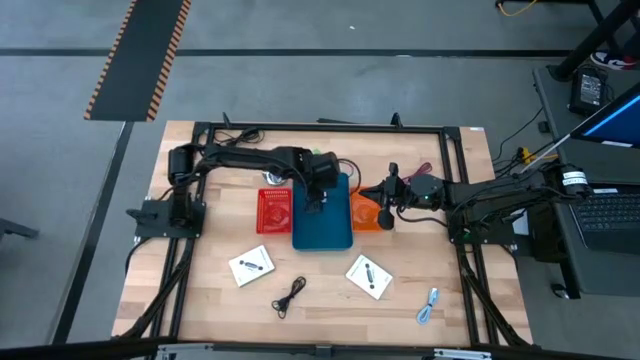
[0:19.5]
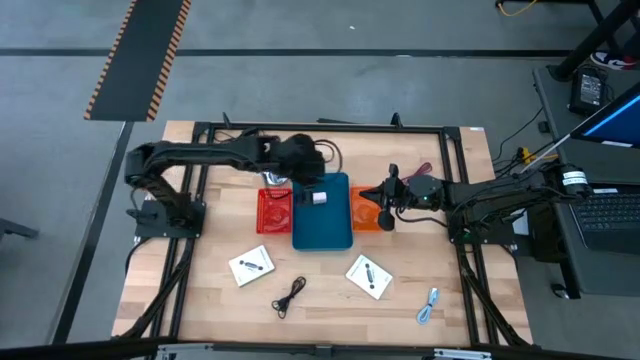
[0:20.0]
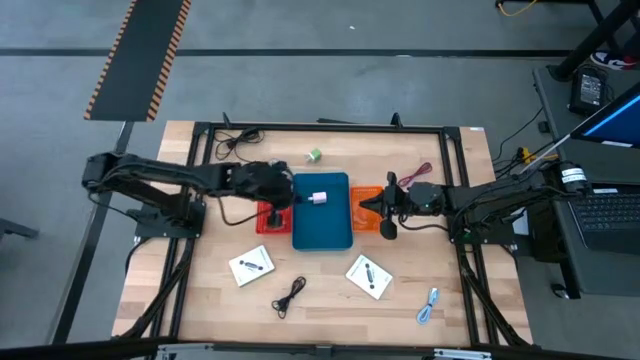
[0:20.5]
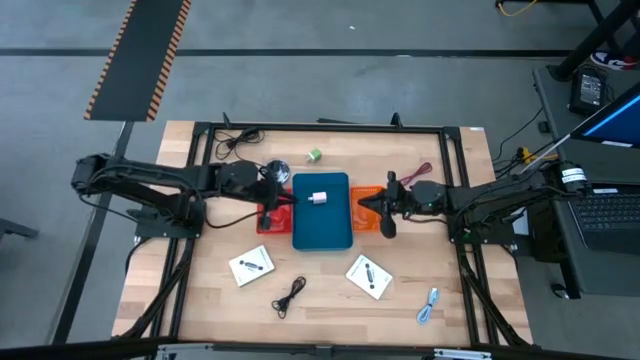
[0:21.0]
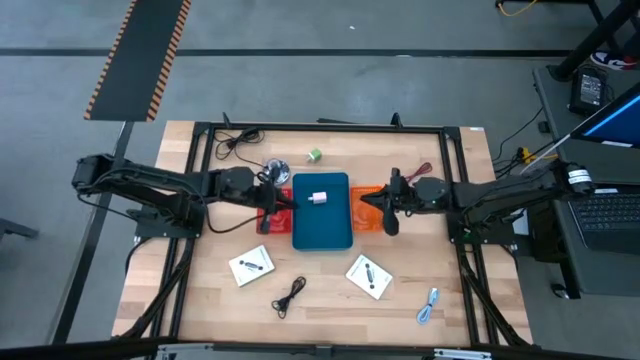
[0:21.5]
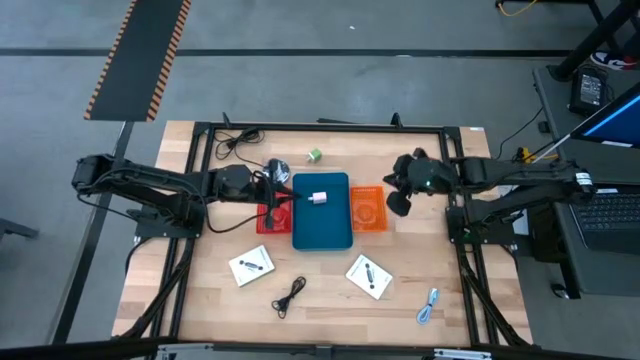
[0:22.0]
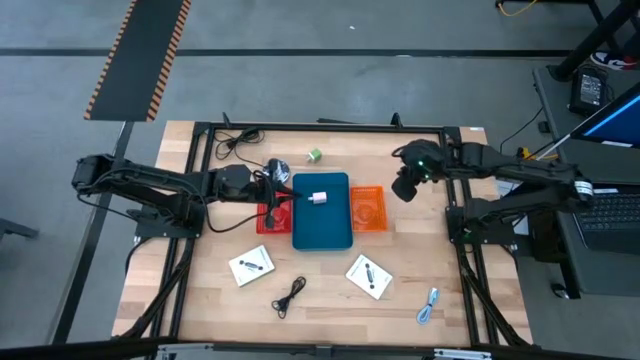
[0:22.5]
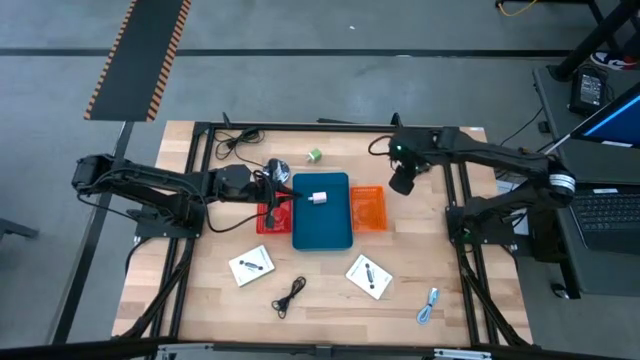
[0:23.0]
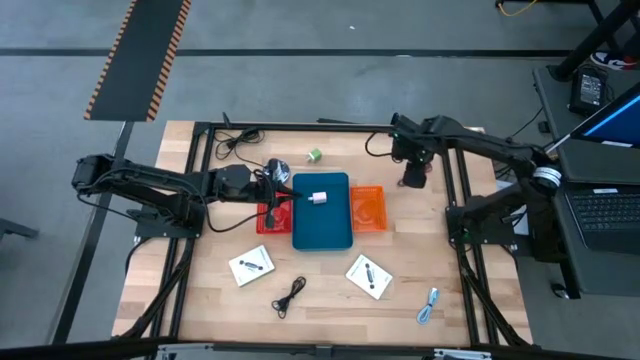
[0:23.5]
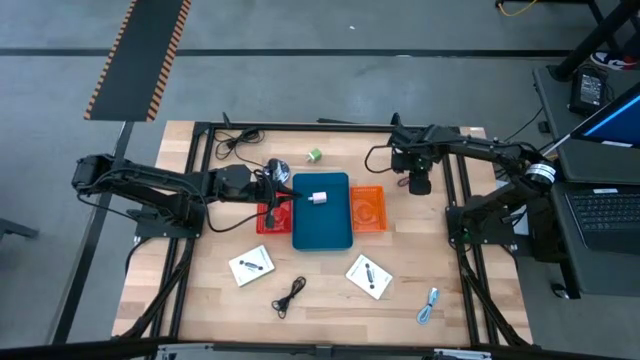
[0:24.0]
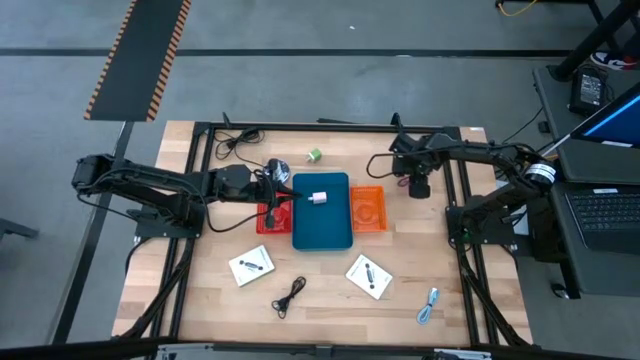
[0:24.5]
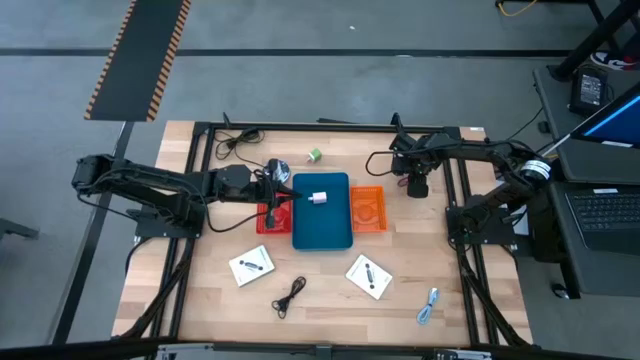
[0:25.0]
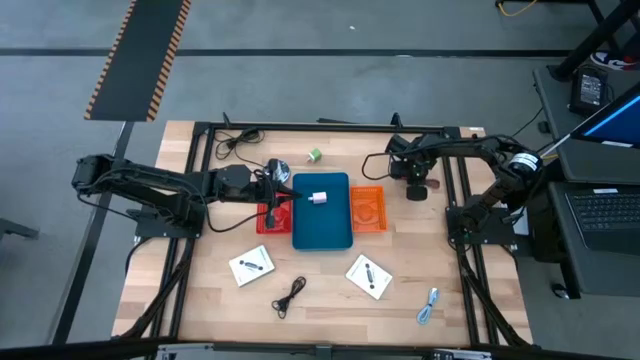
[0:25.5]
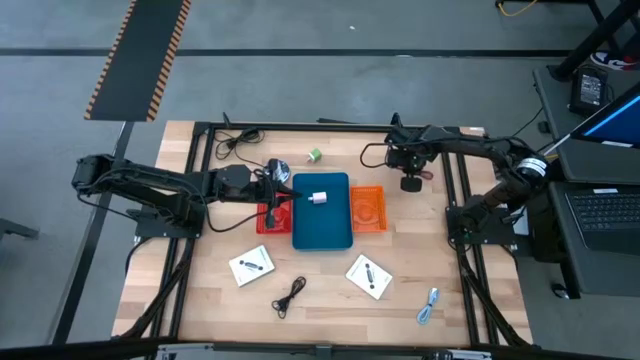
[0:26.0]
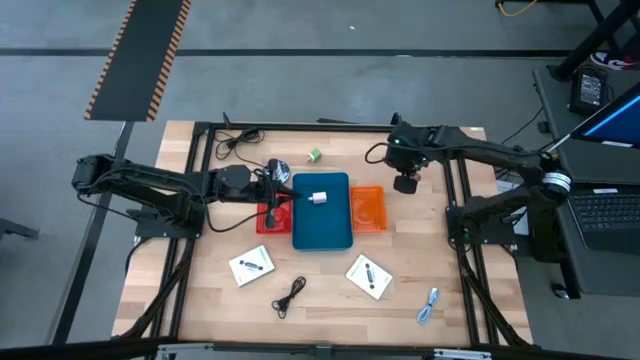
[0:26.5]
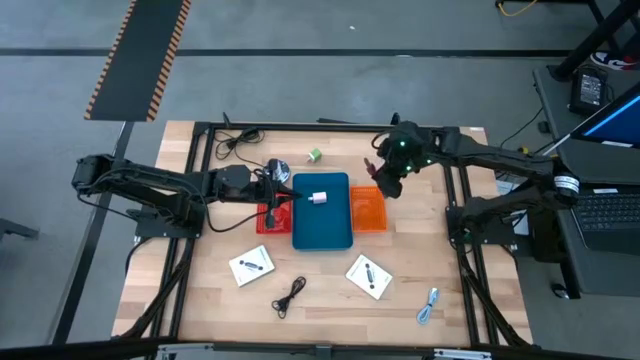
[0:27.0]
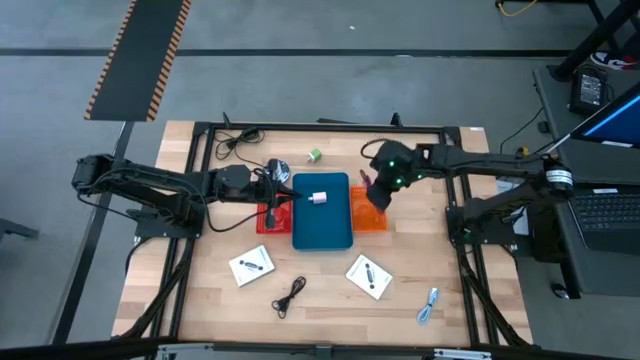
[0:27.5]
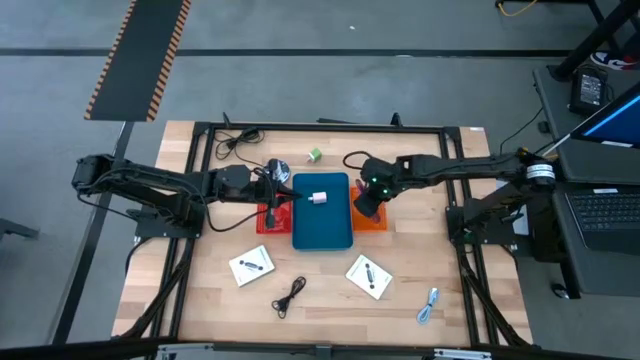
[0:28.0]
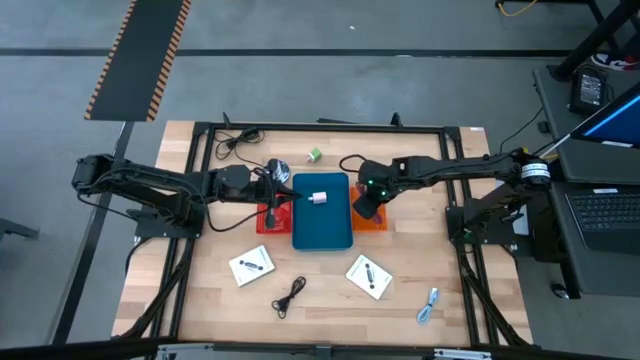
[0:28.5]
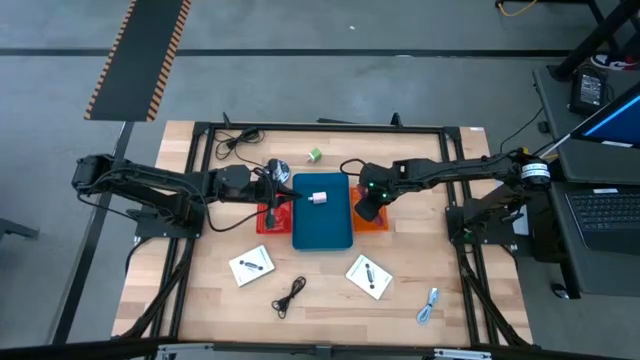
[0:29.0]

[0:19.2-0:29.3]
Task: Pick and place items into bin
Put the pink USB cable into the orange bin

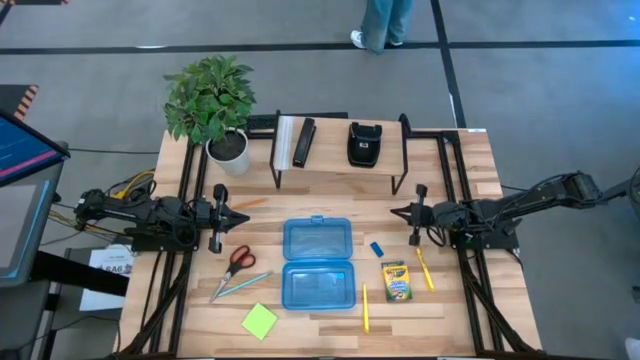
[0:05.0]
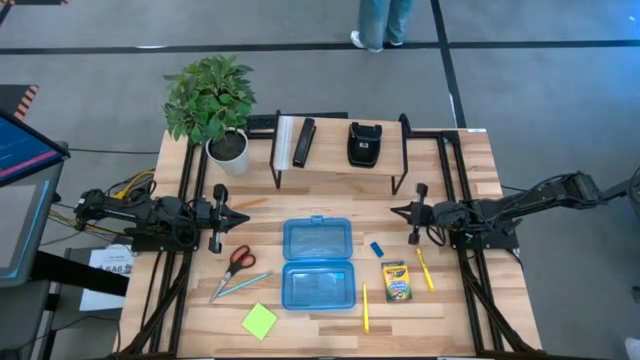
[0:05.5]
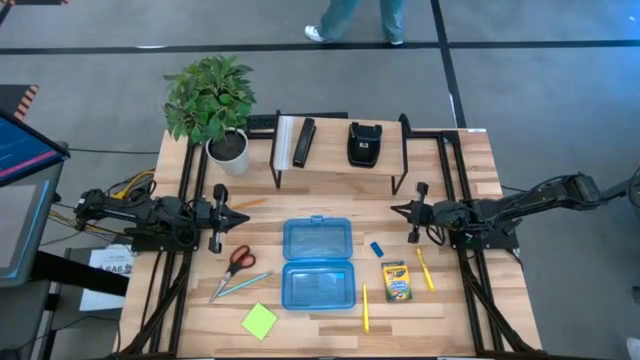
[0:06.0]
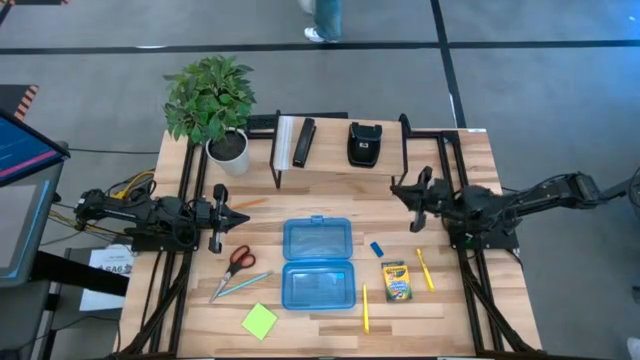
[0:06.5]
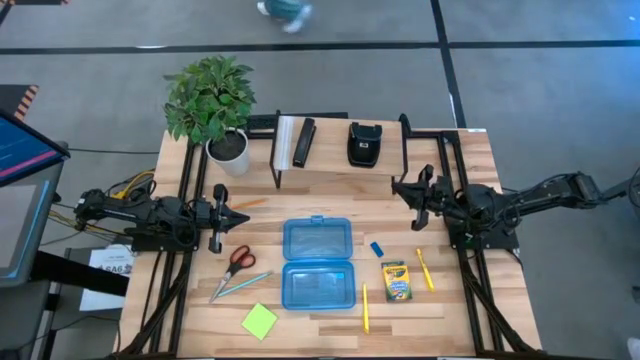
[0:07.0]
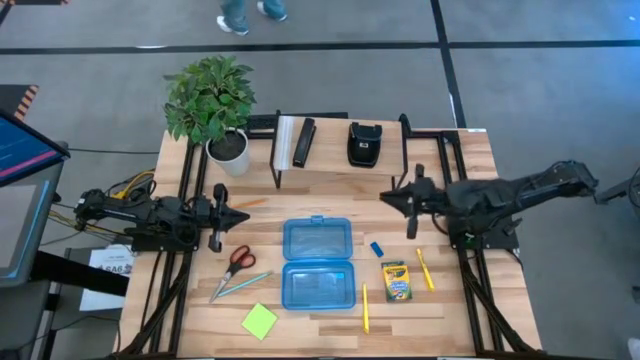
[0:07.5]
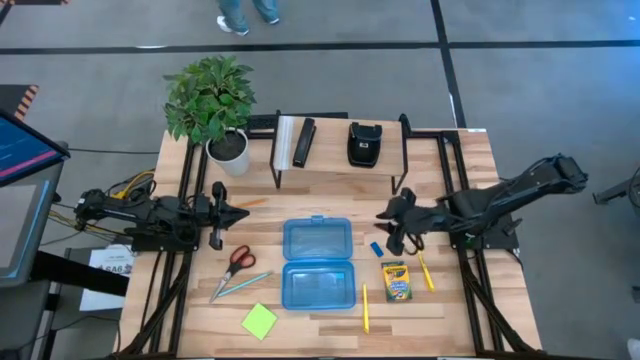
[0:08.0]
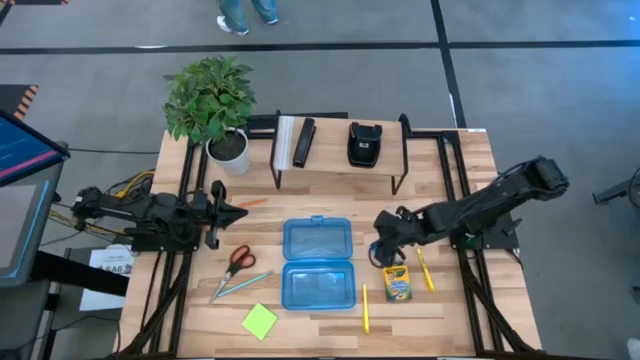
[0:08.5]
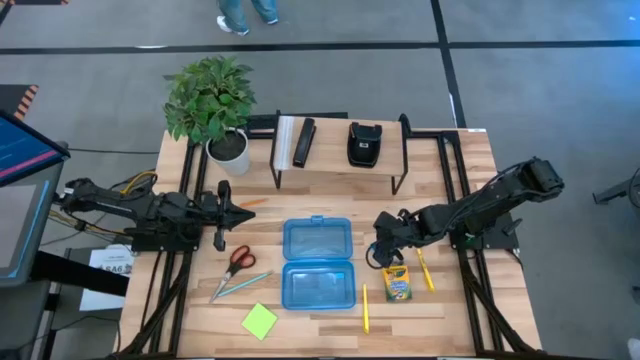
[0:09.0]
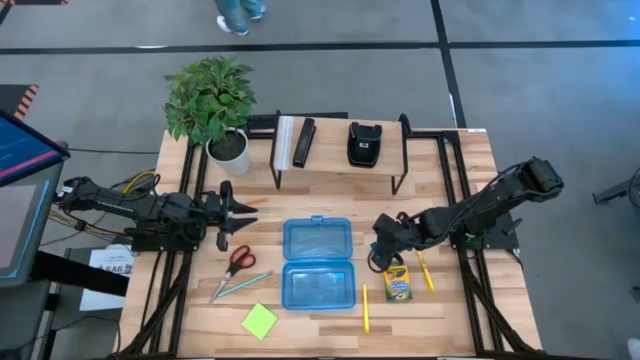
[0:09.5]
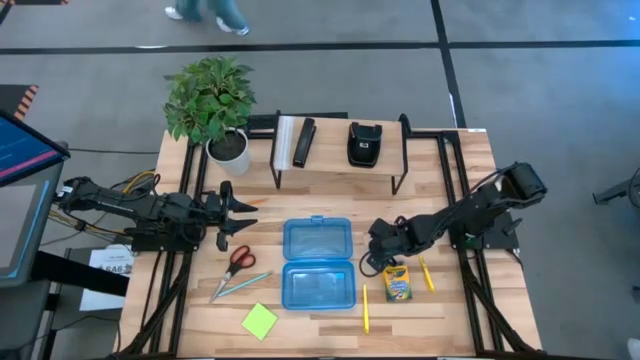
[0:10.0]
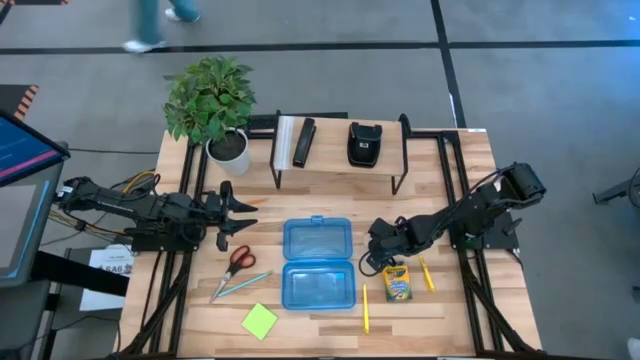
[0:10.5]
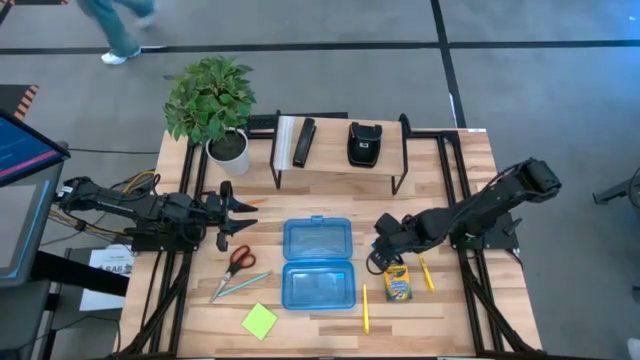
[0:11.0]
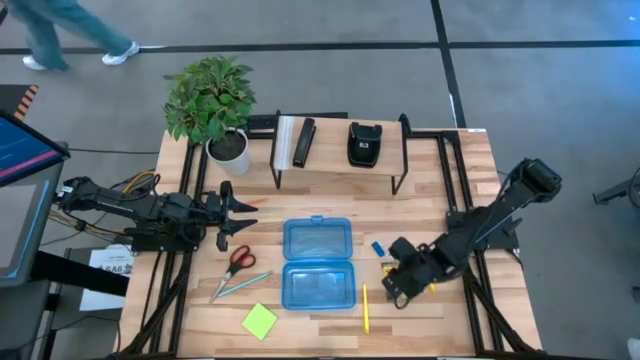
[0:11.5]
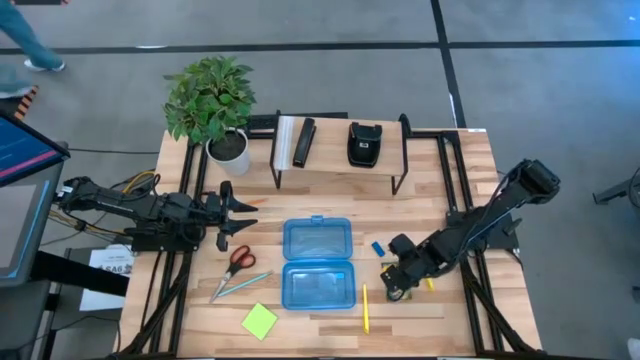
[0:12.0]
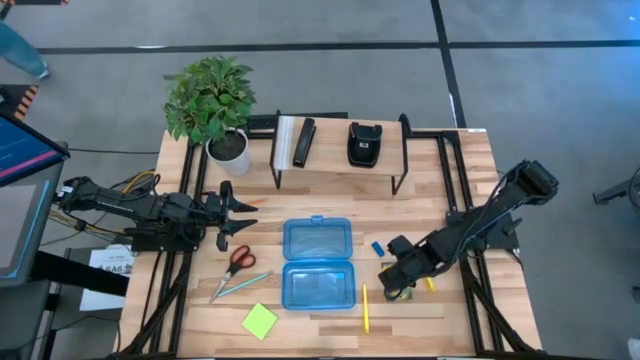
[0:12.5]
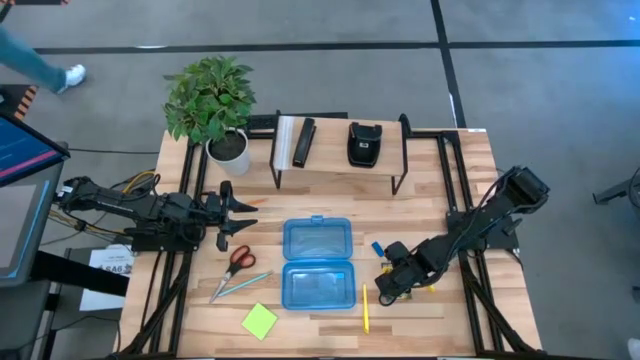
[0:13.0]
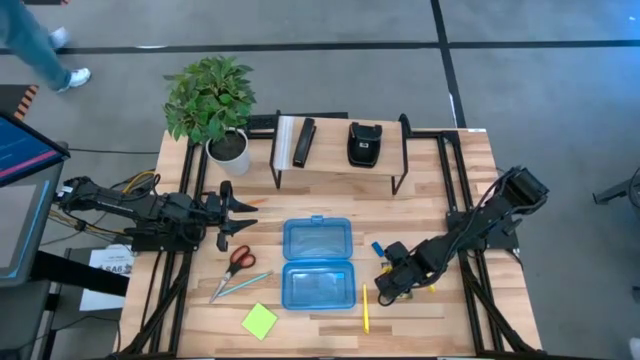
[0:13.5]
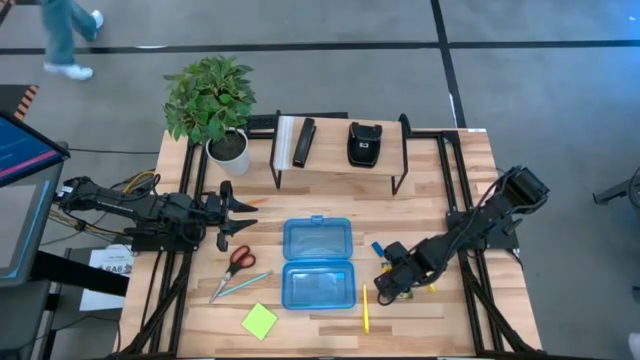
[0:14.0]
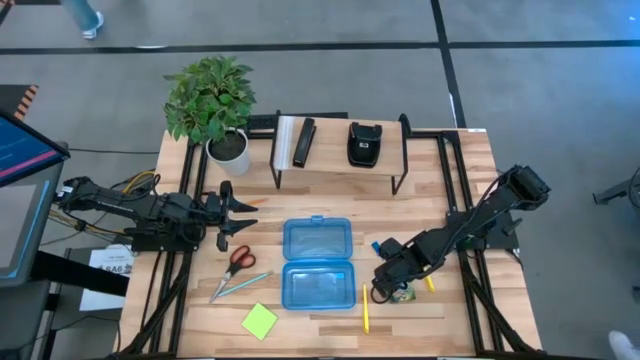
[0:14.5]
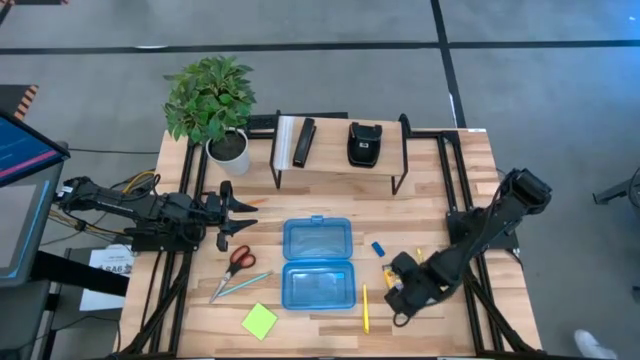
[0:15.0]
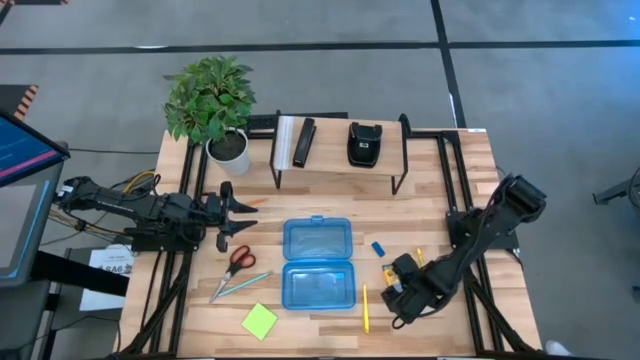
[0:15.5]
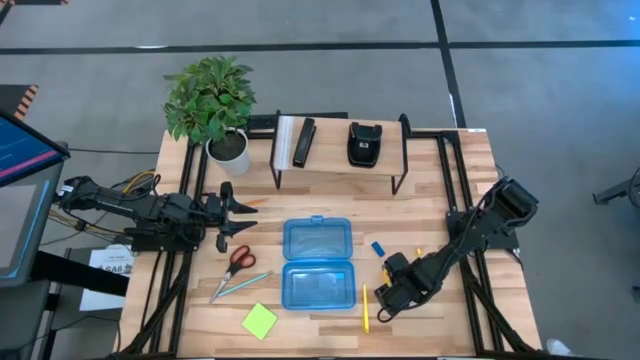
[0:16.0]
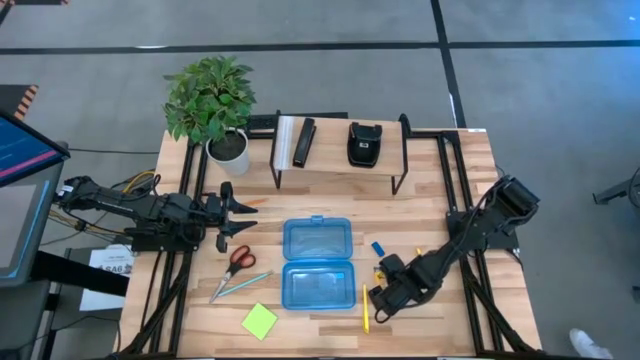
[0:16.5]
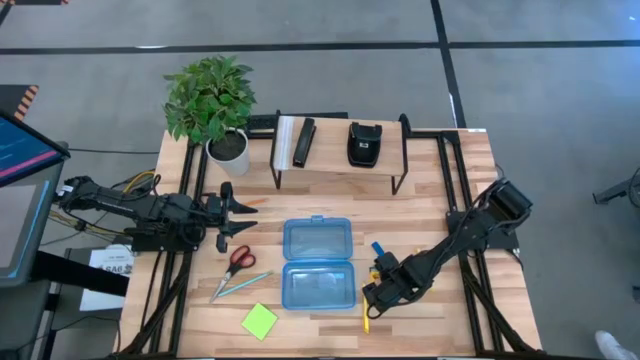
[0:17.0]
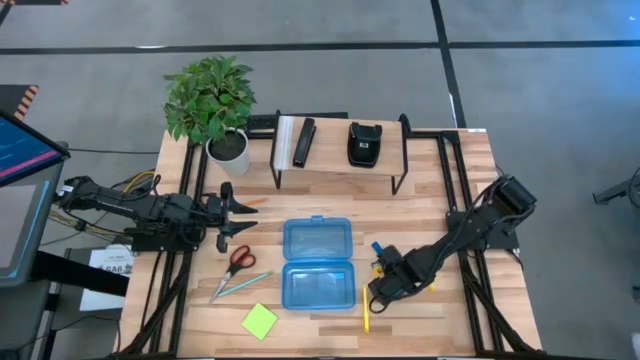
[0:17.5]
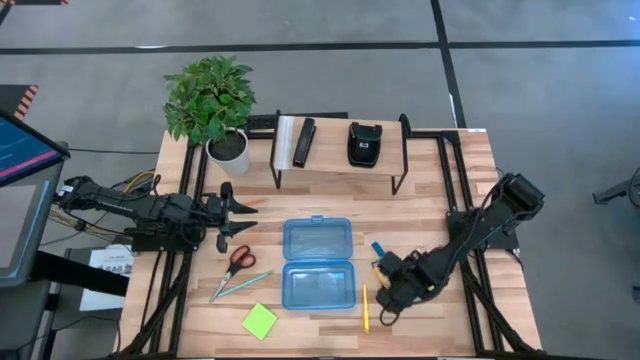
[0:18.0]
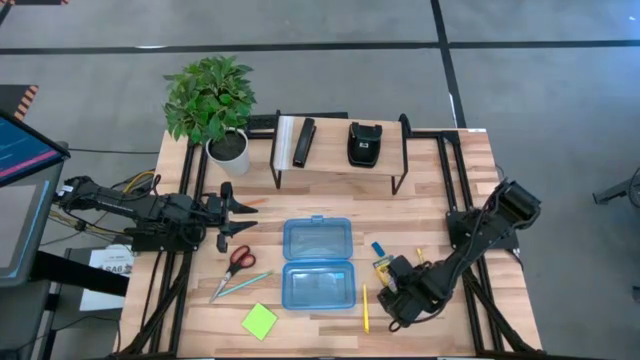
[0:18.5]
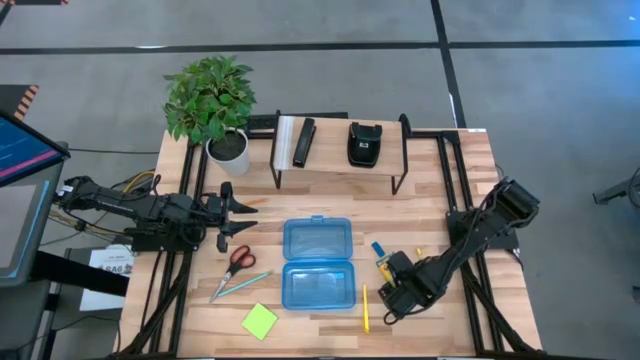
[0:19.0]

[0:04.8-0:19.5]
Task: Pack school essentials
Adjust the yellow box of crayons
